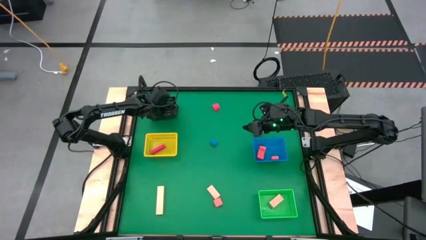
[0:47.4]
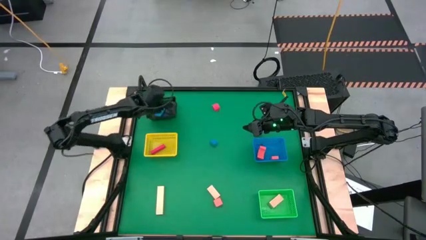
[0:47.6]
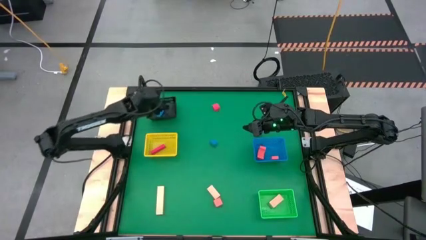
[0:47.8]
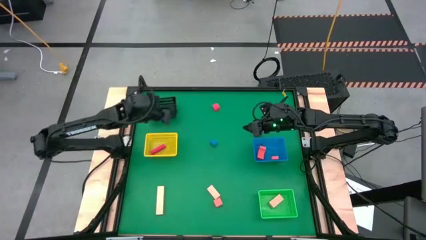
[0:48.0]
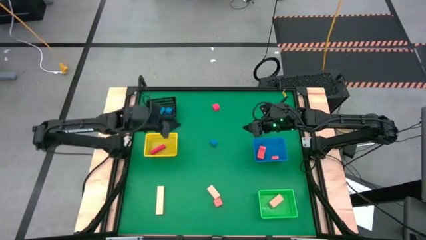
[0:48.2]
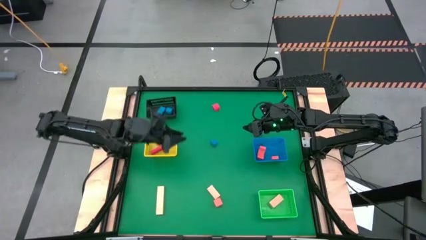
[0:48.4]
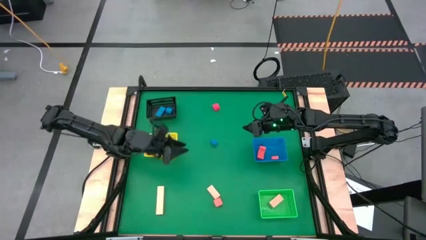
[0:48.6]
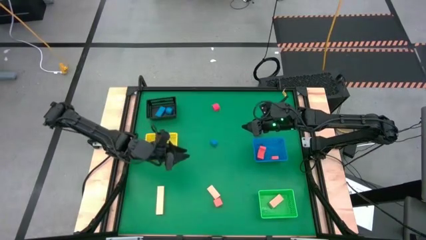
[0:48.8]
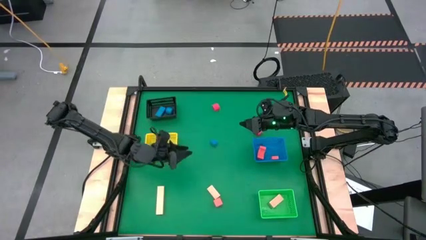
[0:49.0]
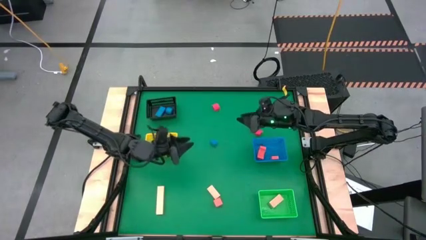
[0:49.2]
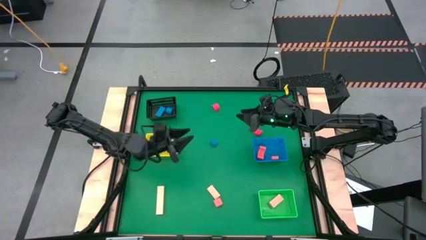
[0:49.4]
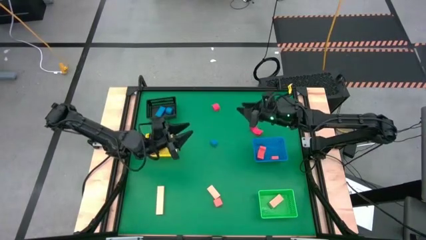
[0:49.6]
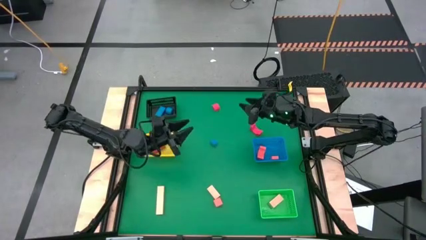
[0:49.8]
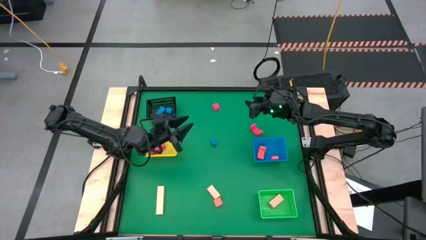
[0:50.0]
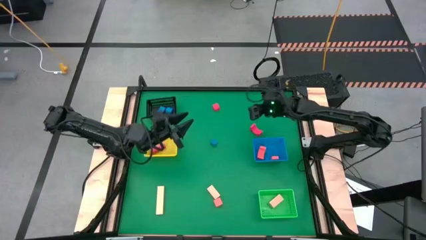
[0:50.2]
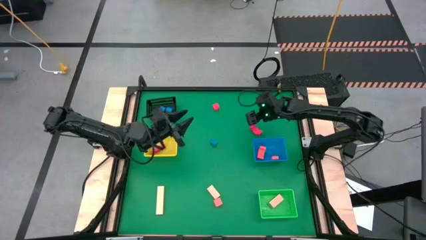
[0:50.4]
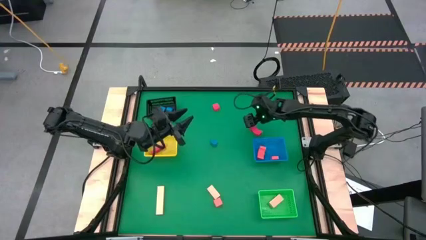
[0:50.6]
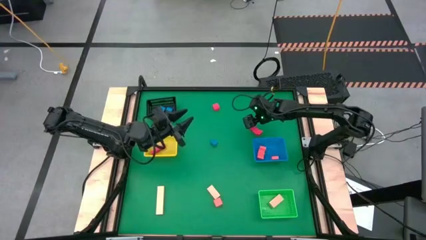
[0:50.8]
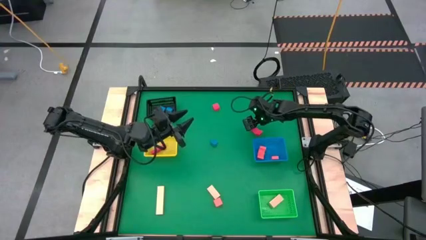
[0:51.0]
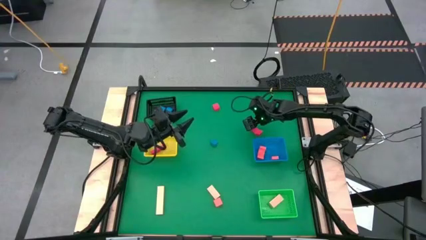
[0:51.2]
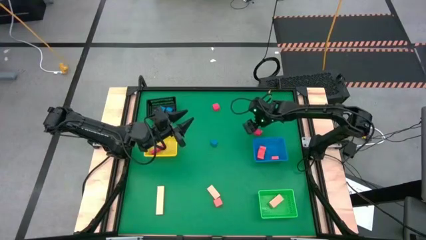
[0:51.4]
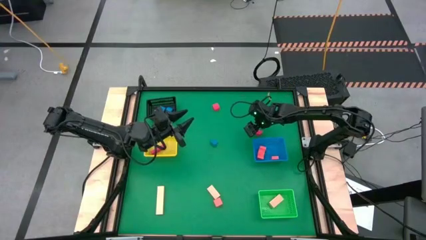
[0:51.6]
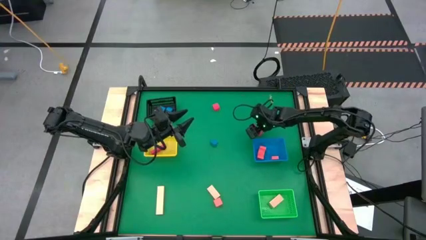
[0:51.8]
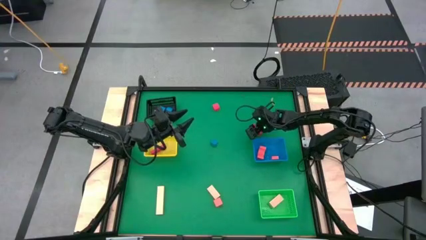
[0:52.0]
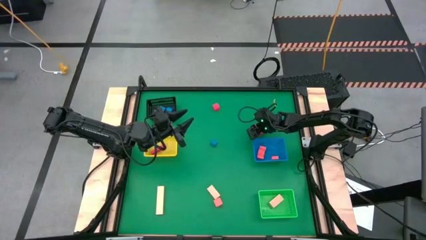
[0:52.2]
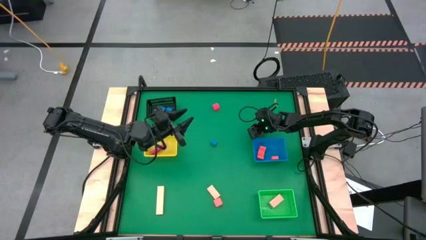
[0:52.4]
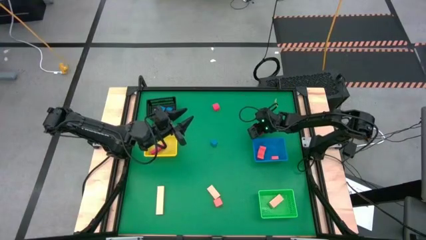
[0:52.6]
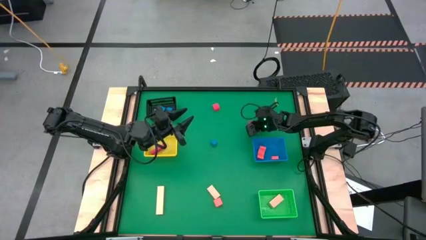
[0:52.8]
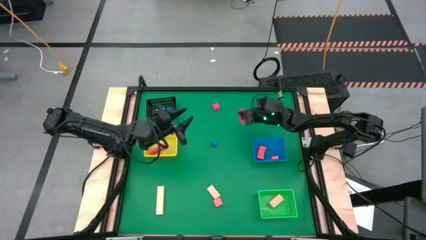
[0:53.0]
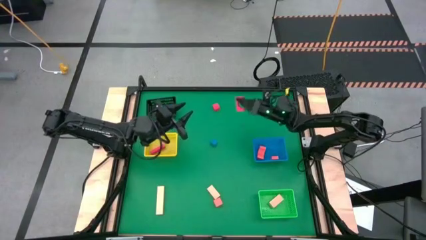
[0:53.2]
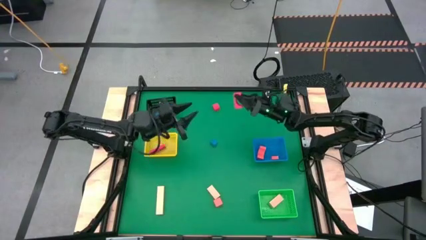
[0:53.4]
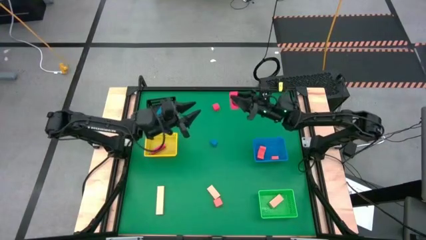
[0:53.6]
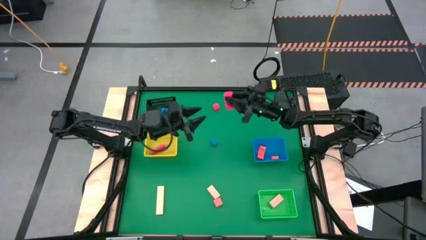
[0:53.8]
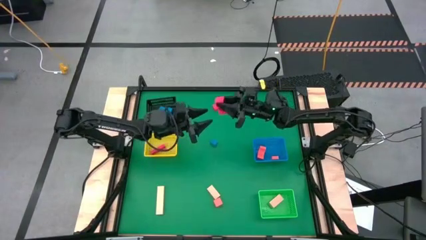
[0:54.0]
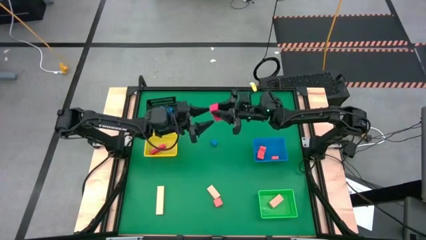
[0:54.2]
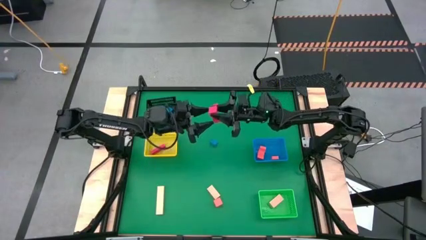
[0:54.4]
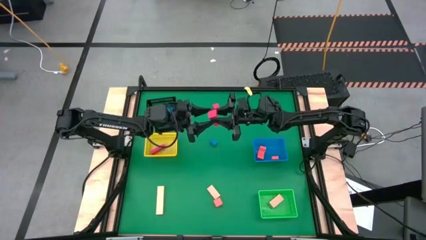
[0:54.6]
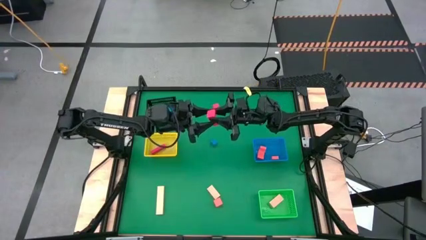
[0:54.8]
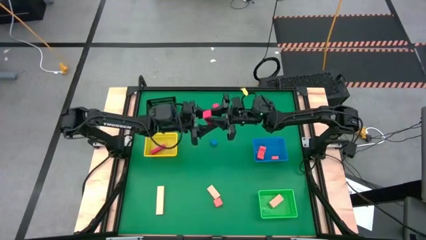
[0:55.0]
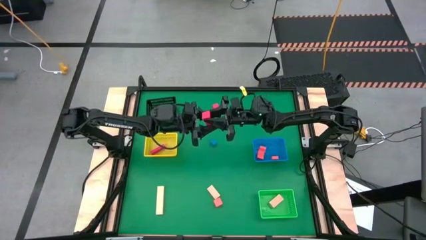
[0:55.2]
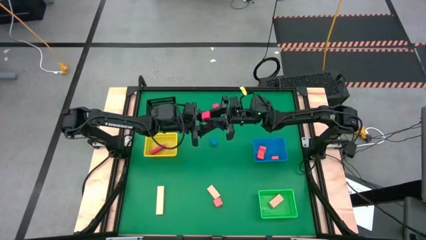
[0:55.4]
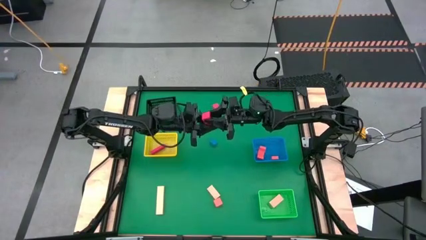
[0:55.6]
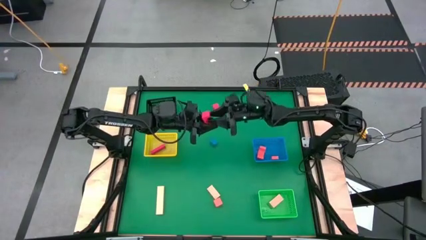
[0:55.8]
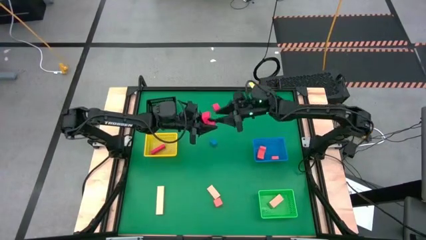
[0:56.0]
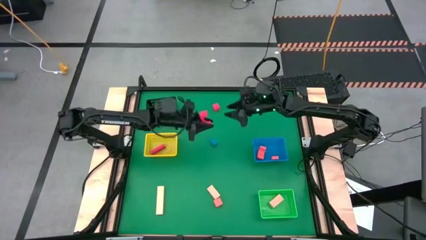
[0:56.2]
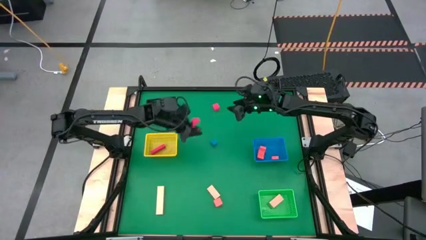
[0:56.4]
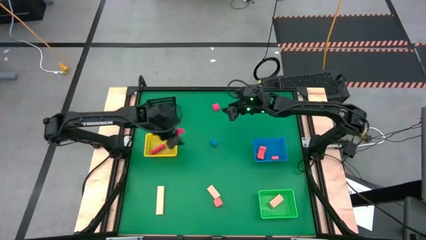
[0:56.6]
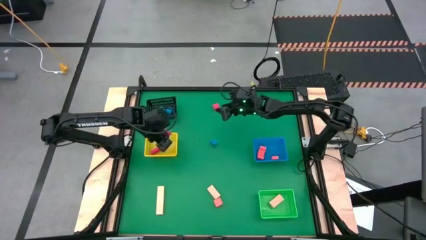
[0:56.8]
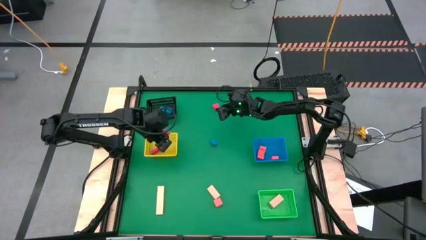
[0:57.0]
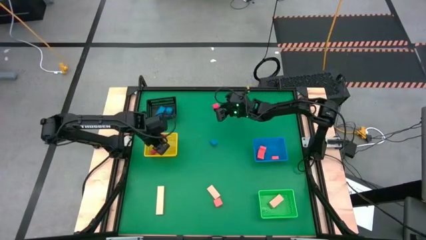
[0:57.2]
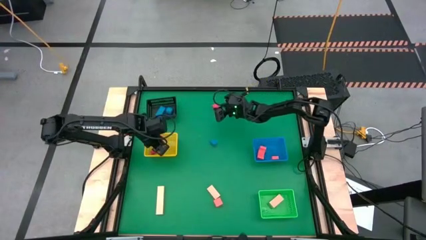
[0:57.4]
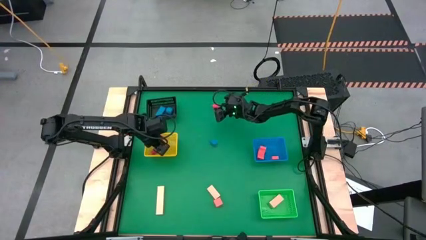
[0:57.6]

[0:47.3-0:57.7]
Task: Sort & place blocks by color
Put the bottom red block into the yellow bin

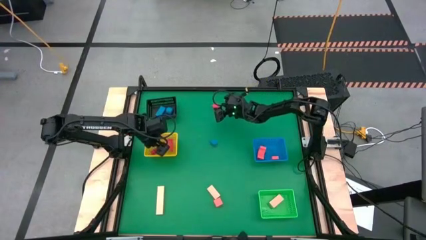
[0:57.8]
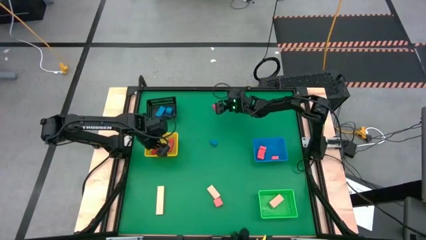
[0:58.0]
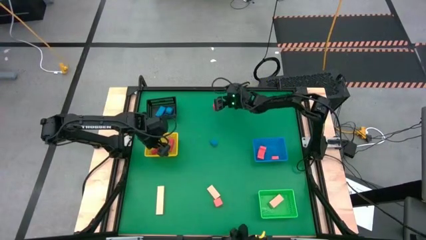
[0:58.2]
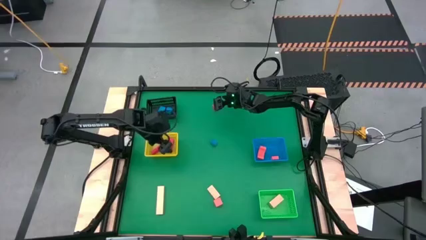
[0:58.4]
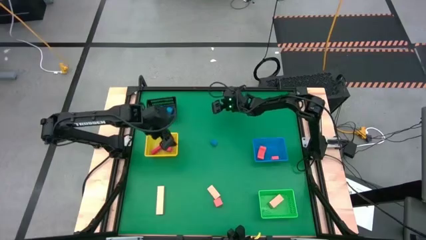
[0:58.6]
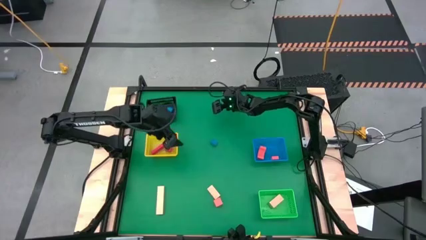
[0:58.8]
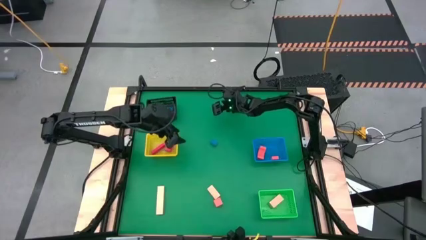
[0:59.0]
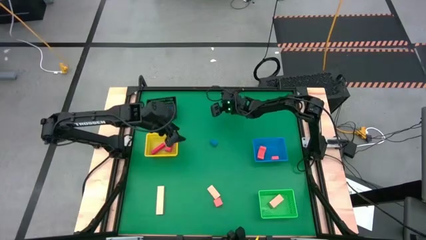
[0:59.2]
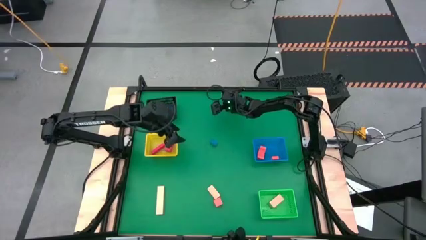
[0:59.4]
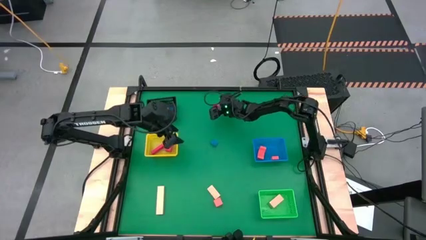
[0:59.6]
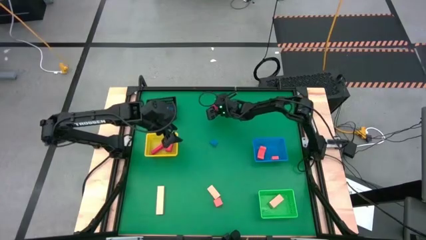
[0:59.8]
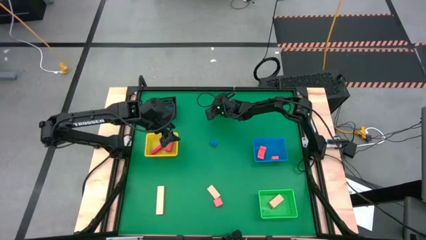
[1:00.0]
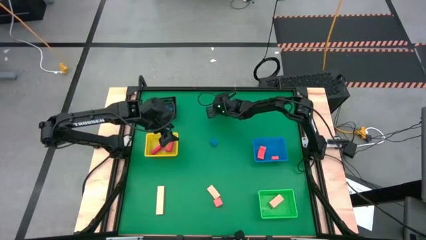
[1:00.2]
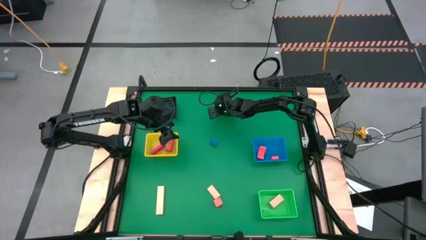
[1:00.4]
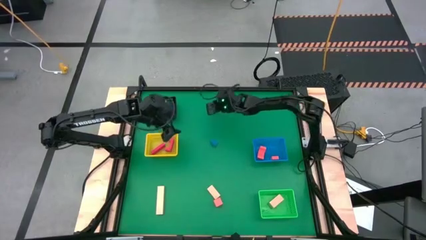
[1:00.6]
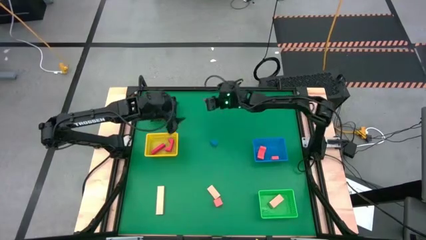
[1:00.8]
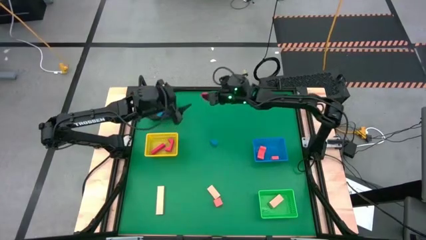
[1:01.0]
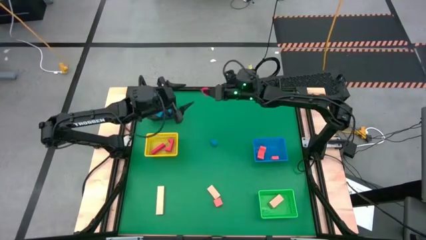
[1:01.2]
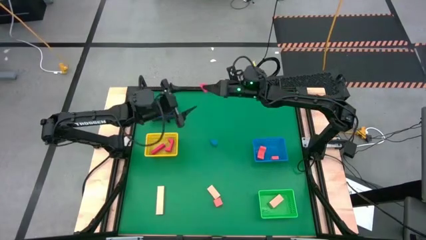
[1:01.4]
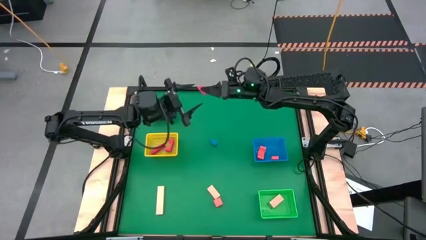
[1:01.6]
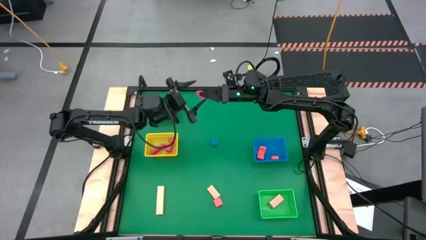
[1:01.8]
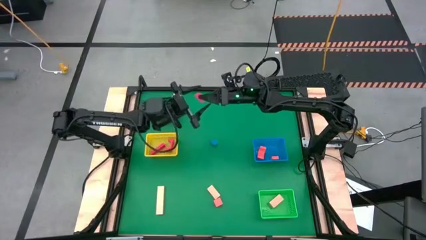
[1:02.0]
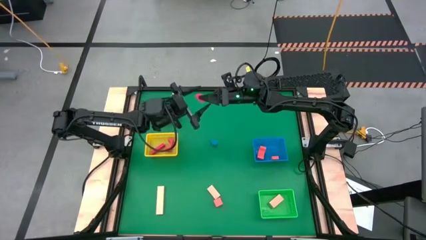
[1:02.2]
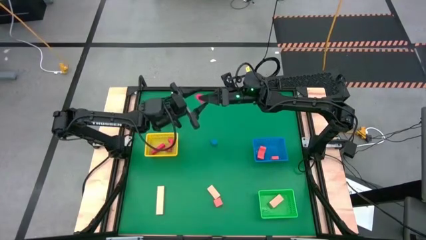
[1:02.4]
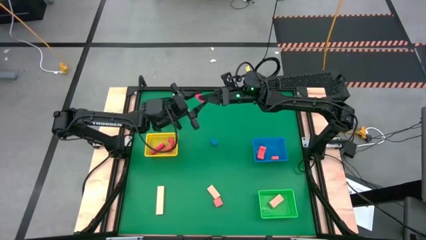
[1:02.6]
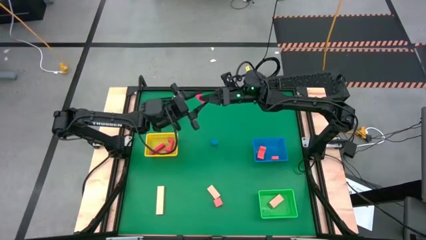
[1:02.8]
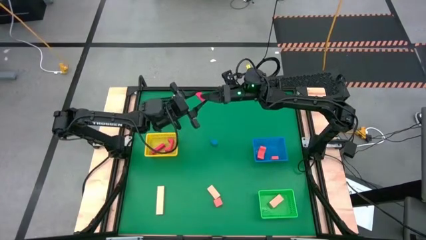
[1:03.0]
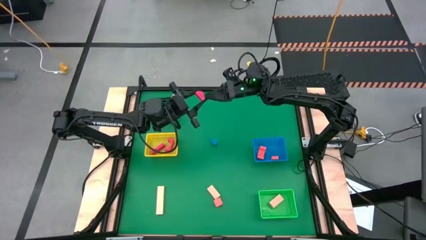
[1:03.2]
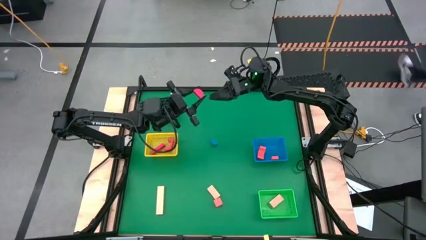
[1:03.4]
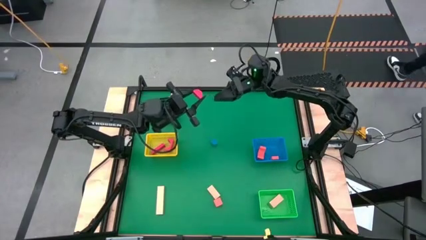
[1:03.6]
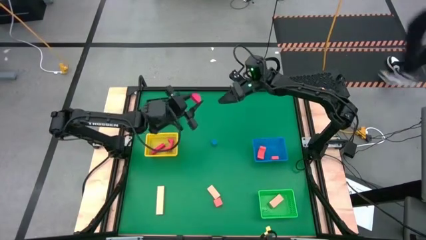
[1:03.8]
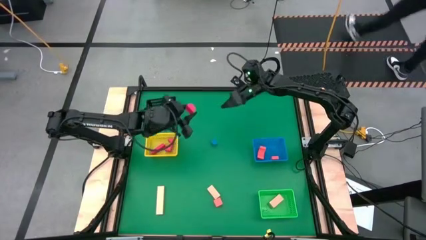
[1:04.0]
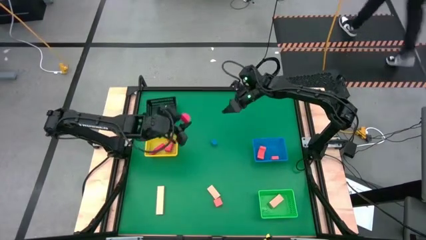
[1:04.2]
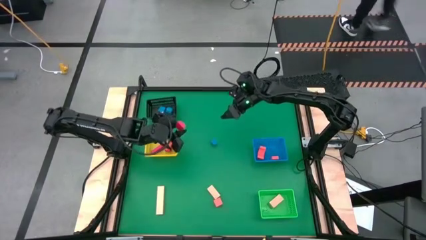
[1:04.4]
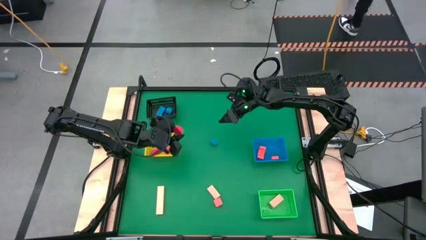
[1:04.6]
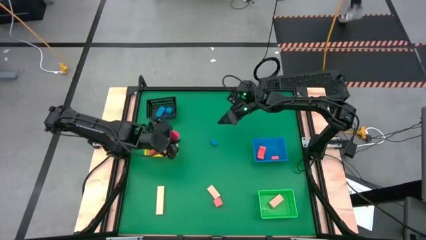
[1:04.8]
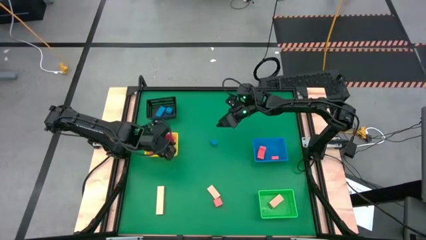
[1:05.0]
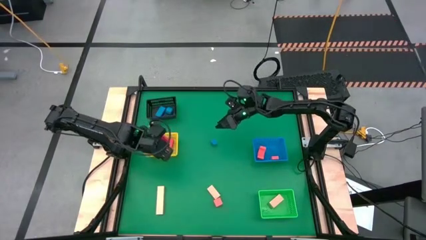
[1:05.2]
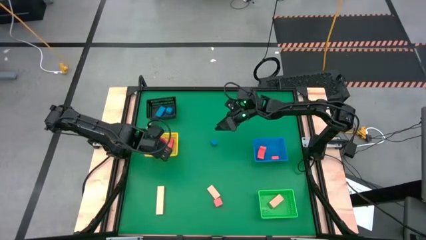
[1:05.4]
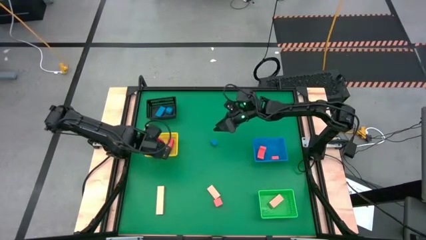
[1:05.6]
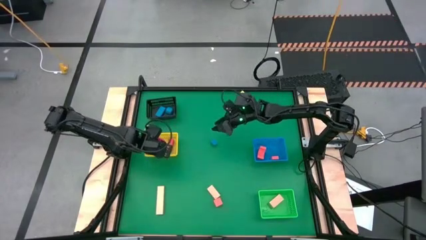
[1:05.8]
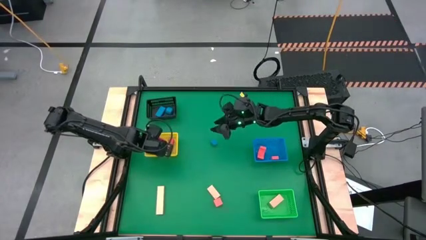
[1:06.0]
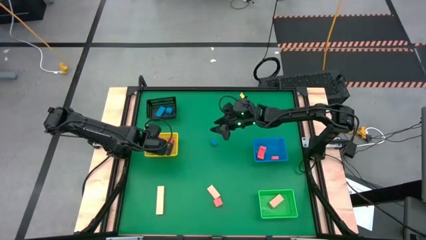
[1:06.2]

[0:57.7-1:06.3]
Put the red block into the yellow bin
